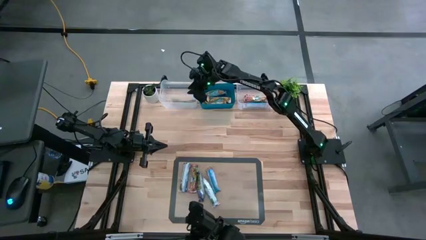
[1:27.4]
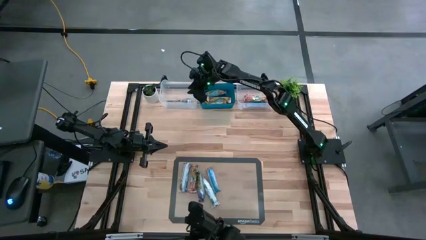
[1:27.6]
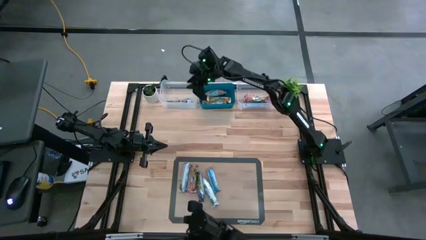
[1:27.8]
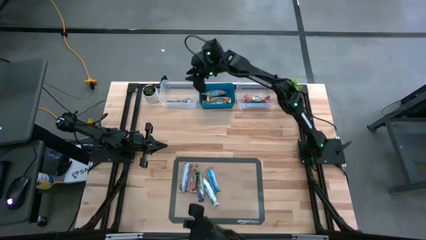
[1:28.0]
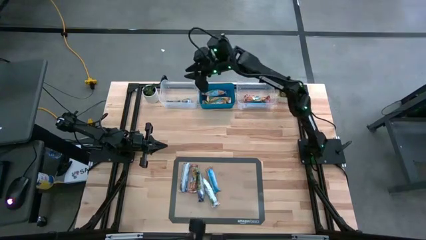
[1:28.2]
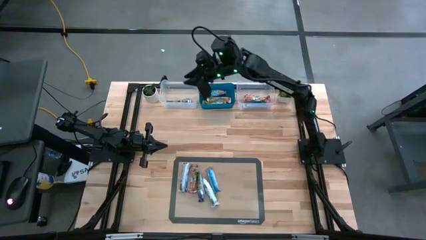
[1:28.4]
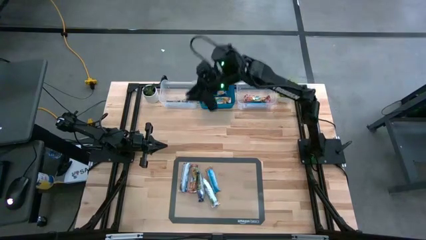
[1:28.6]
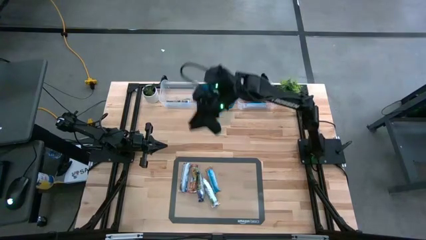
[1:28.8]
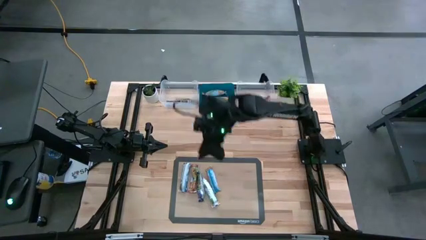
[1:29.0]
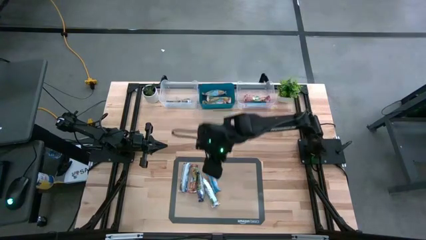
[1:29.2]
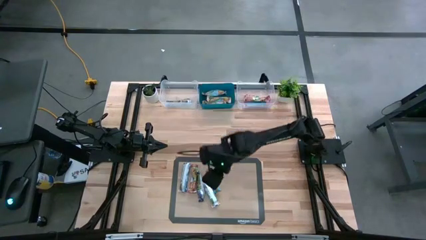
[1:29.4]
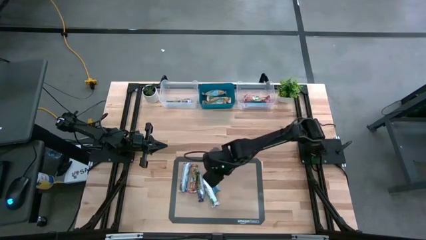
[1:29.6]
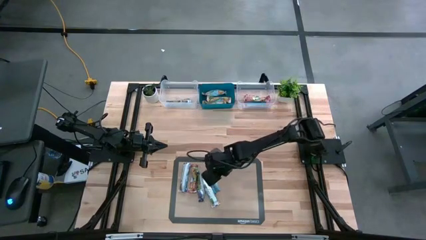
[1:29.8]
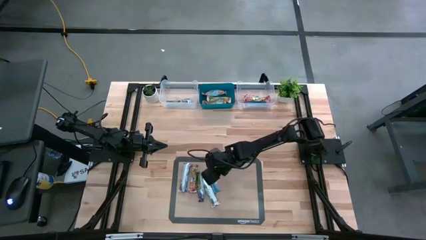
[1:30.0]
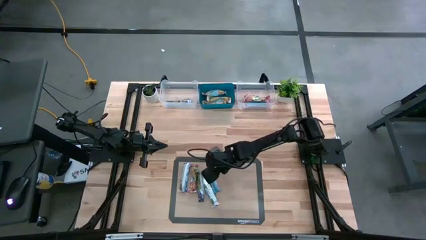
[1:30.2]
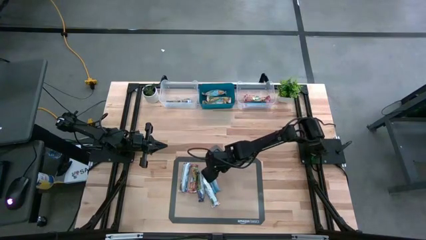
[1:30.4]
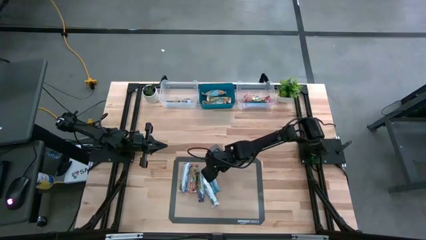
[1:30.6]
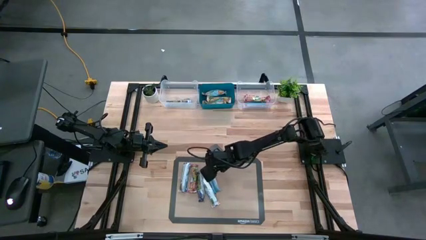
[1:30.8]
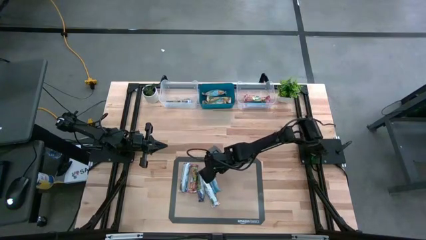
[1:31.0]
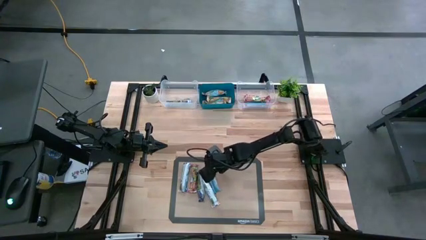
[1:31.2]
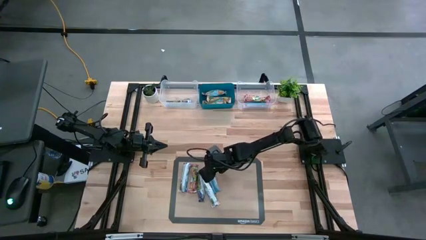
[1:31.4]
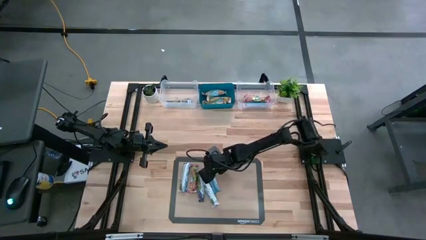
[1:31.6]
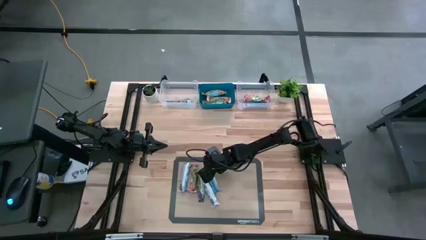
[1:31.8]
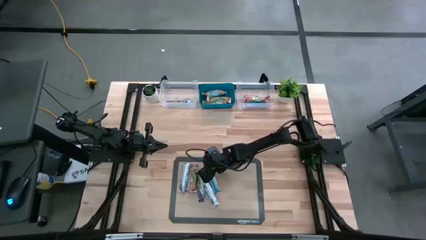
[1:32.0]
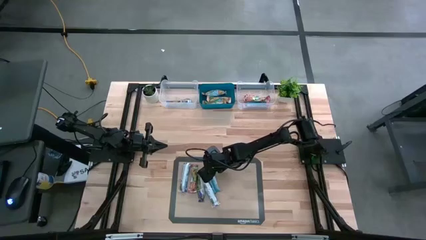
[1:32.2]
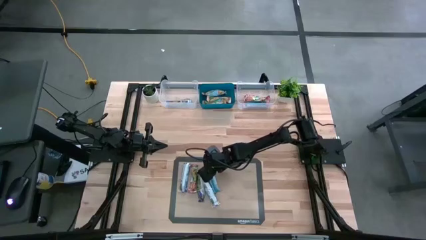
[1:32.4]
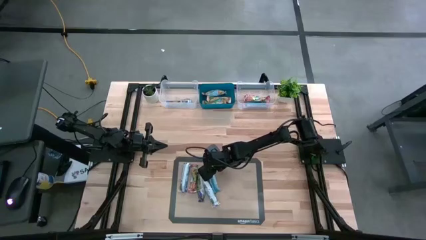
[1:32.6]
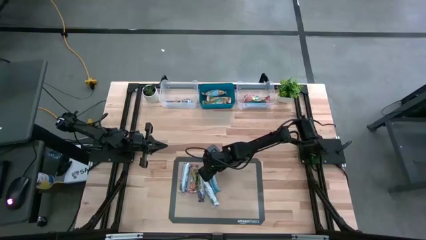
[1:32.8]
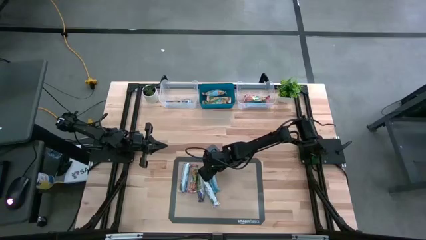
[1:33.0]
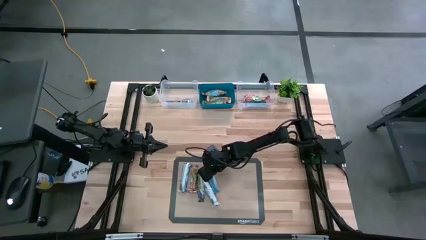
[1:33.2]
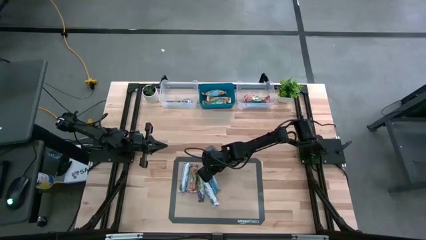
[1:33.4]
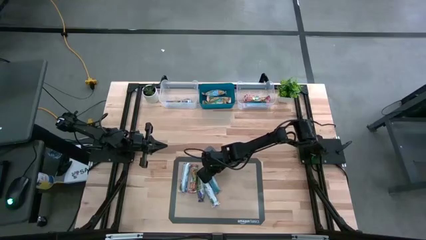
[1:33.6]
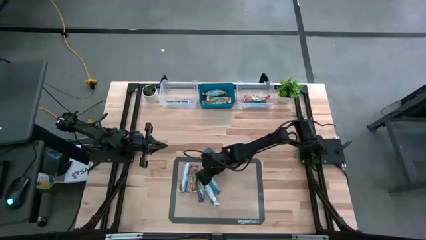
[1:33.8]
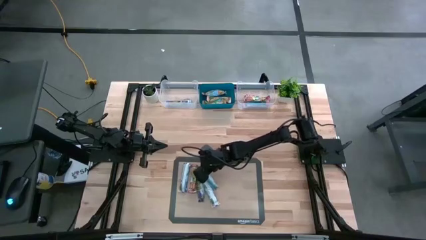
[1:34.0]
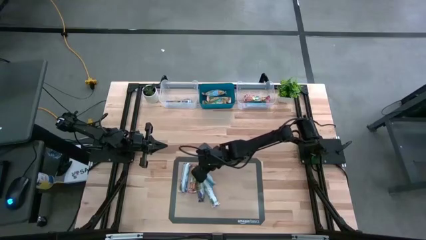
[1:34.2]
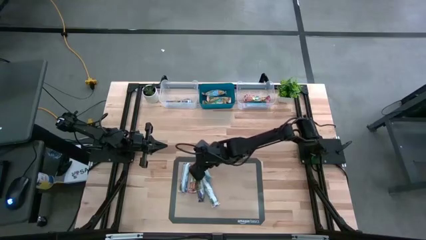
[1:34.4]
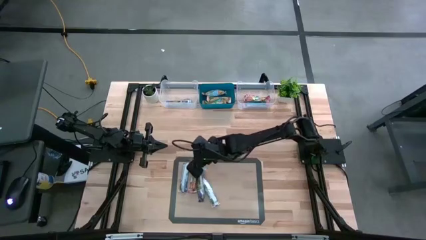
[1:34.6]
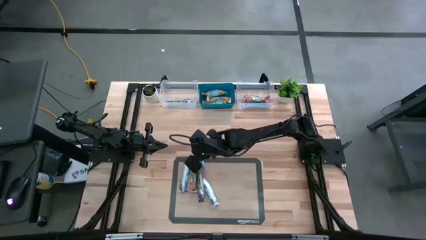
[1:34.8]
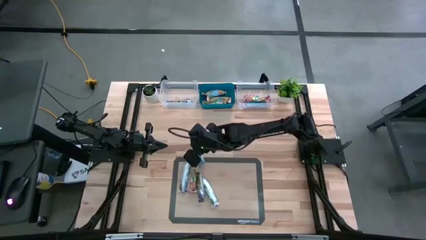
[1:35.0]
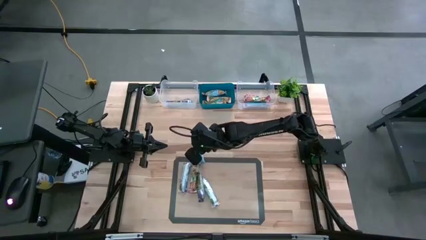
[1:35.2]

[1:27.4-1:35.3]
Task: Pick and place Granola Bars by type
Put the yellow granola bar into the blue bin

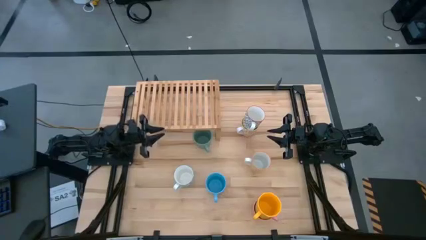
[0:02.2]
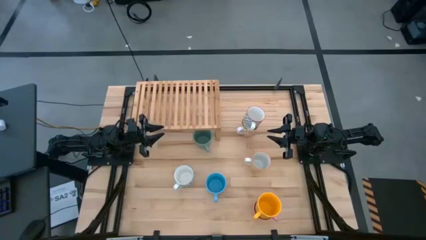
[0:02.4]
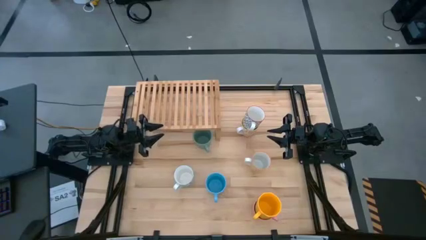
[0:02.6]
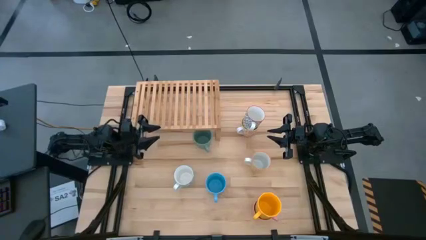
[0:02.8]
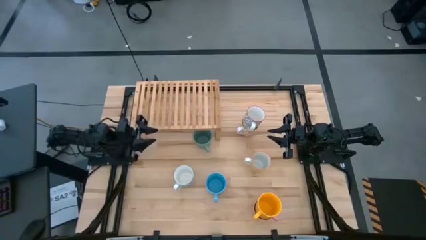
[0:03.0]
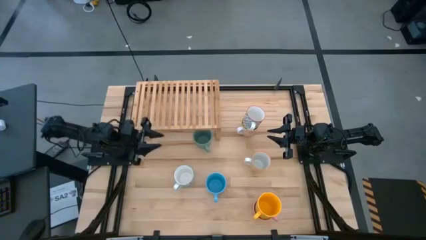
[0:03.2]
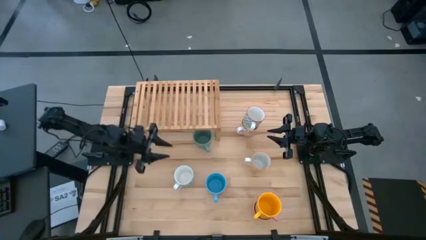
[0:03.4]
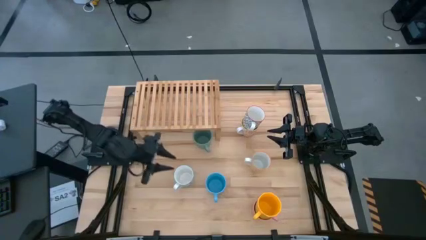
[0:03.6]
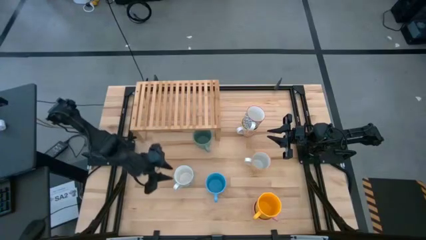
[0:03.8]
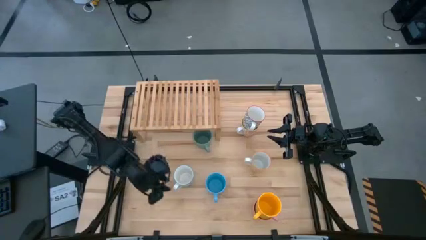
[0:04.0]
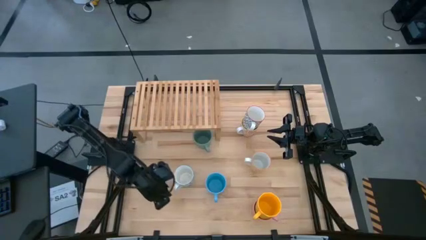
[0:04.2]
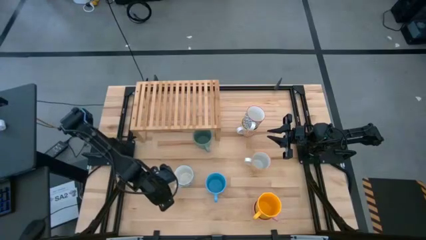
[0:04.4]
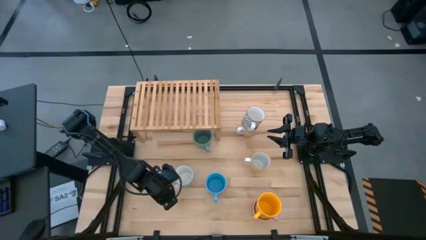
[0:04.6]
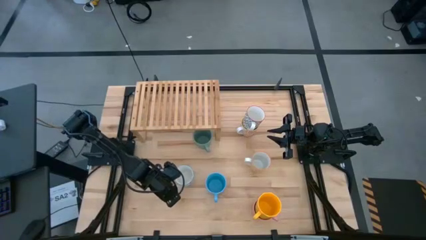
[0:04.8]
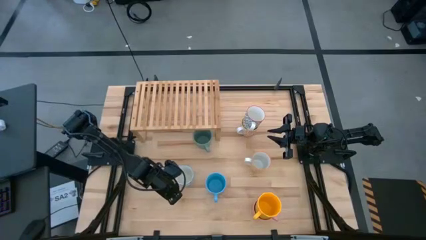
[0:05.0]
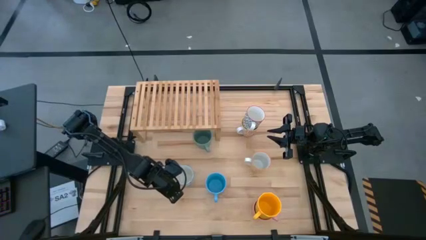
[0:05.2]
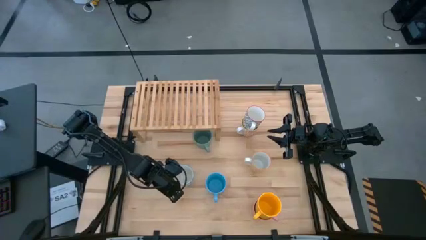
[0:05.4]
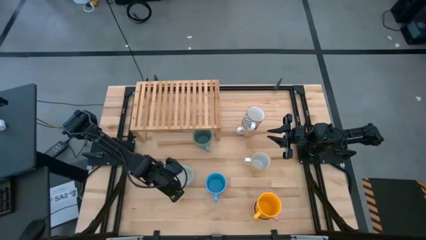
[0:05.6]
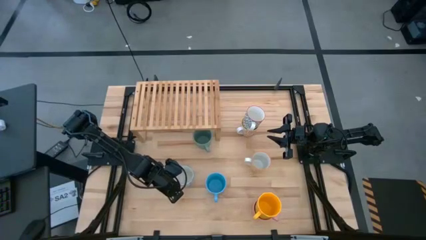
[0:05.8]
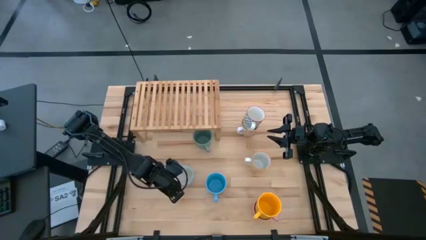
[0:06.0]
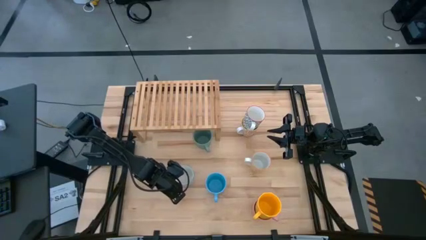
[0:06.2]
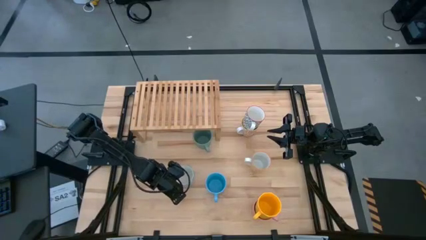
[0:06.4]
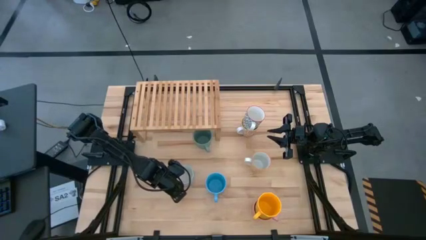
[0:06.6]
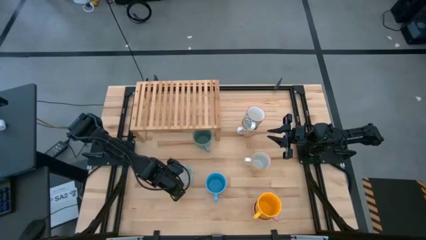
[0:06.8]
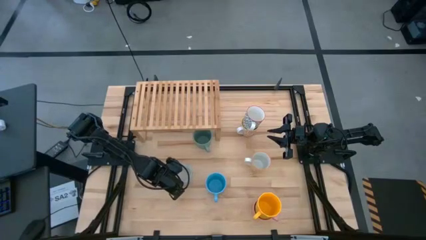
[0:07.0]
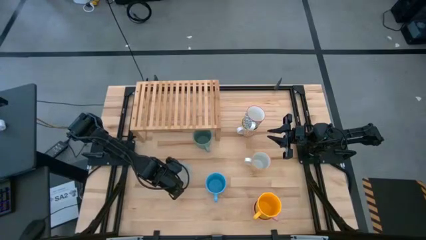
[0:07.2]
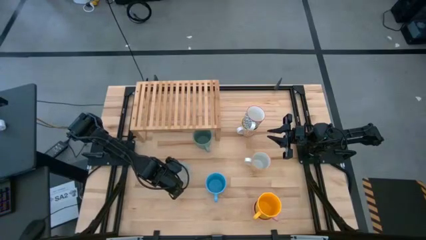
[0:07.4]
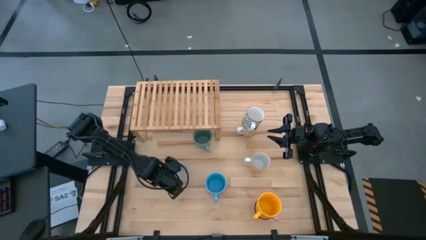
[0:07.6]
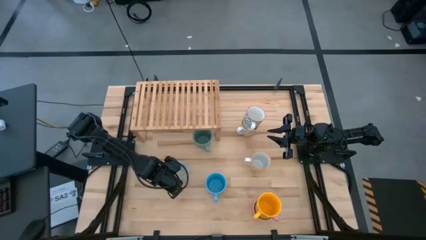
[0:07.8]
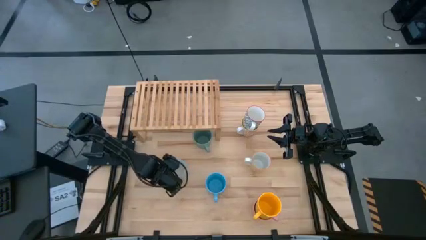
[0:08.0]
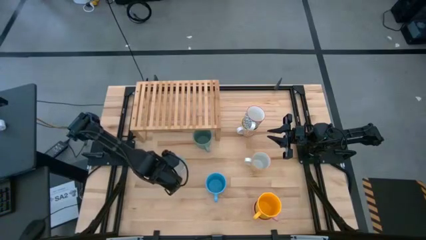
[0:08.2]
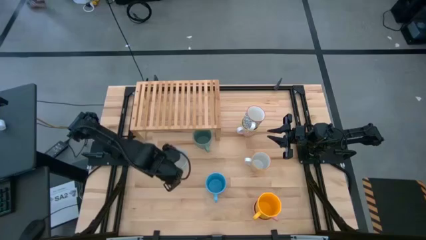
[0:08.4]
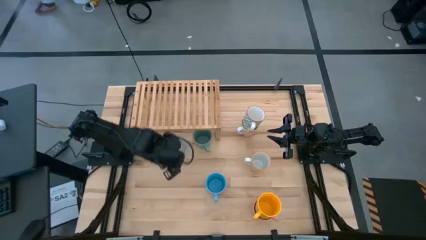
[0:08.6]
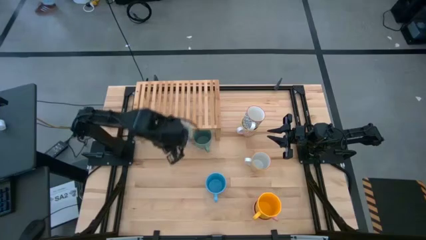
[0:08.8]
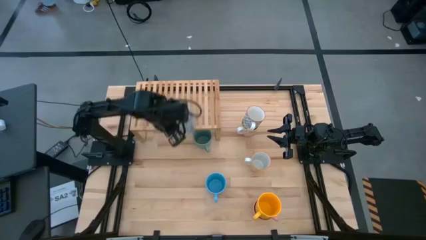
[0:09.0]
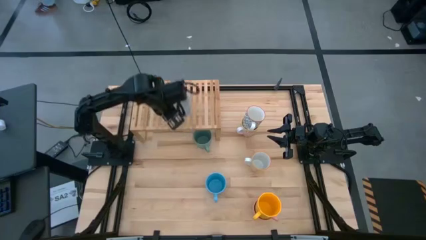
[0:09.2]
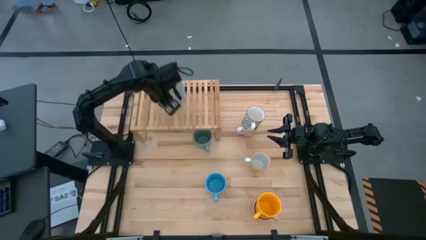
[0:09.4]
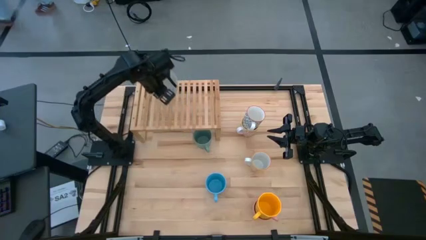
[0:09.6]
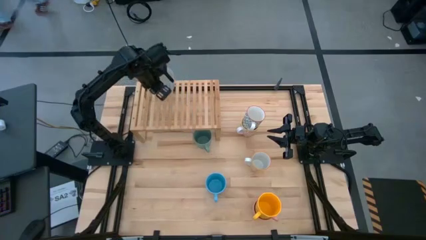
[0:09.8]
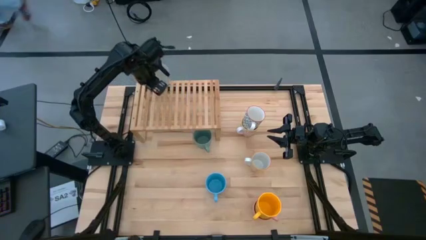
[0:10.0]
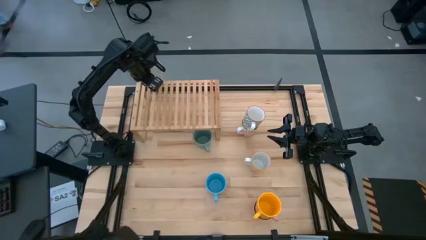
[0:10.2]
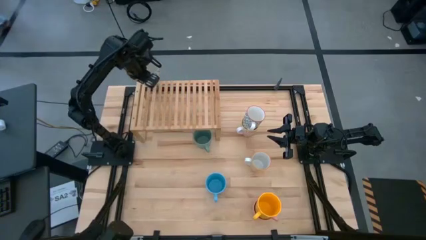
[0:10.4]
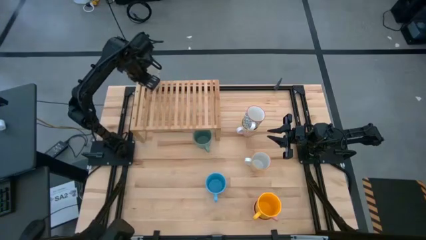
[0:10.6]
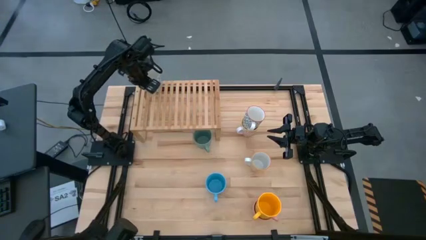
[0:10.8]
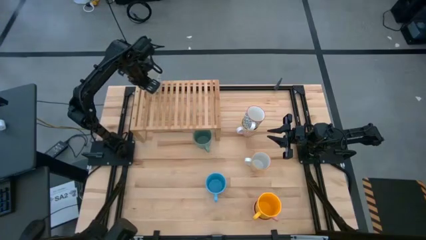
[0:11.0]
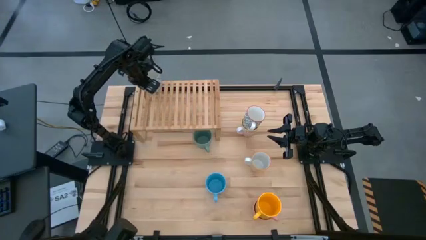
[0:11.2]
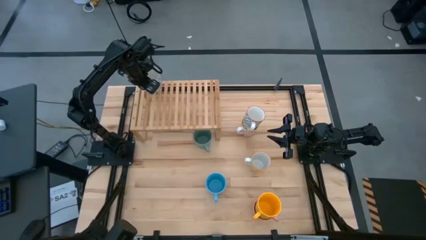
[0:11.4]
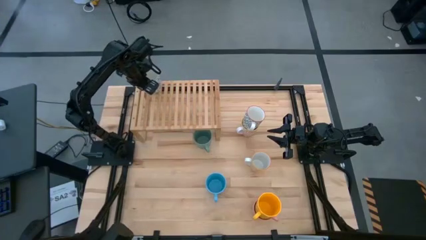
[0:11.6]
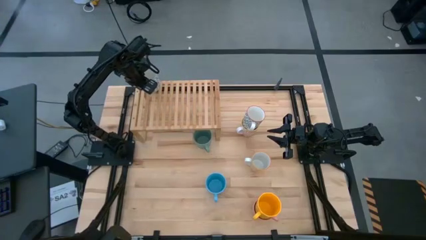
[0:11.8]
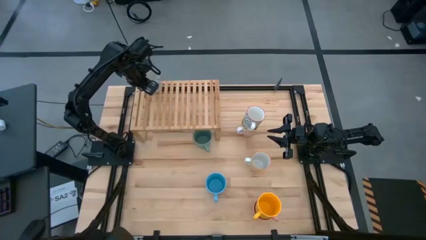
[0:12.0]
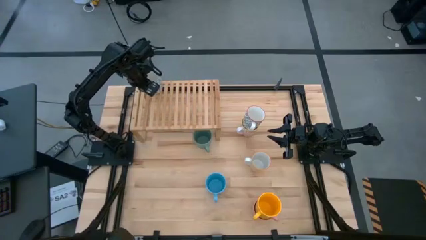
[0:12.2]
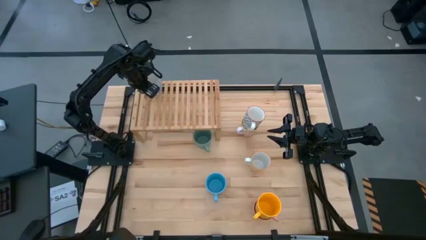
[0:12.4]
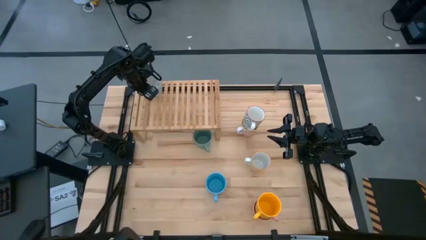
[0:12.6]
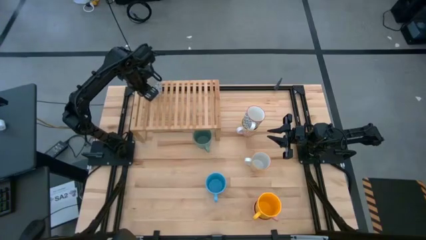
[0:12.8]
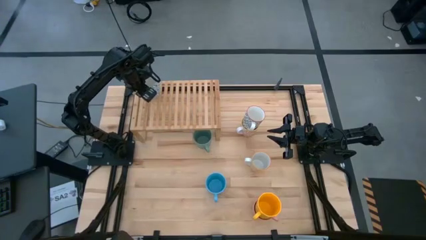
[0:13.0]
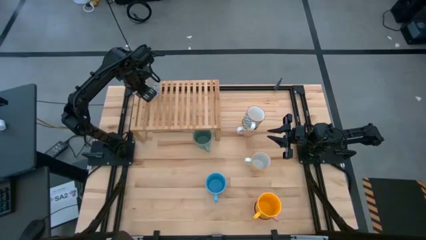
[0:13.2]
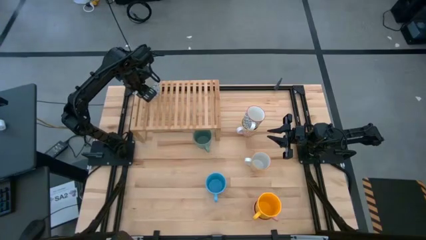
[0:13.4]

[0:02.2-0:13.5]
Task: Place coffee mugs
Put the white-blue patterned mug on the shelf
